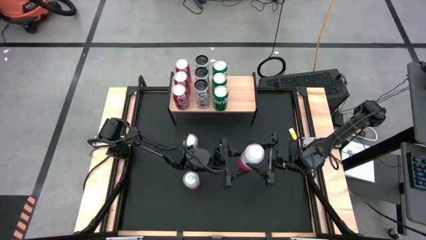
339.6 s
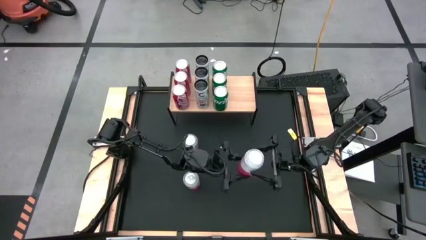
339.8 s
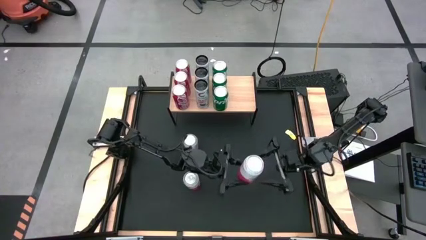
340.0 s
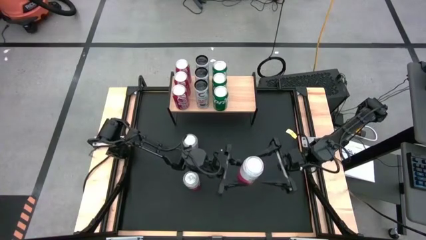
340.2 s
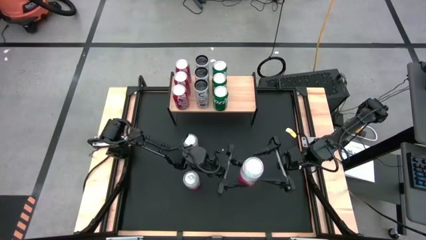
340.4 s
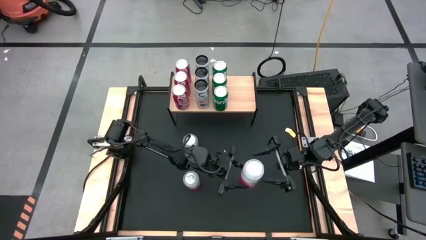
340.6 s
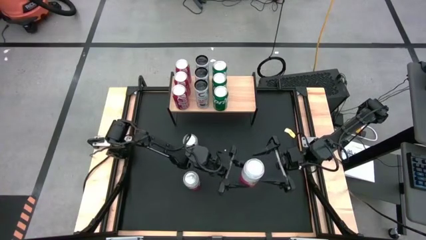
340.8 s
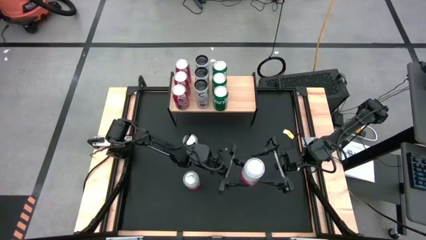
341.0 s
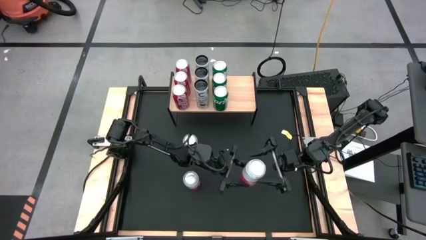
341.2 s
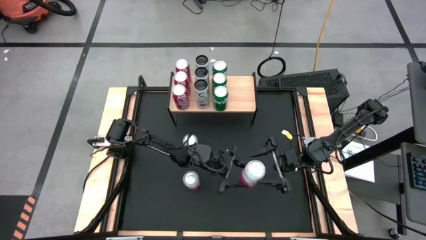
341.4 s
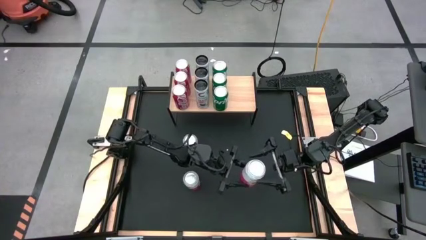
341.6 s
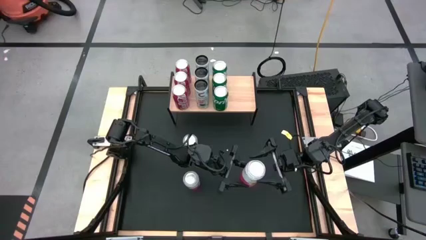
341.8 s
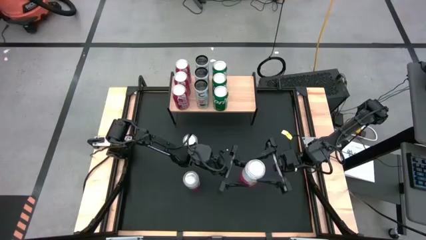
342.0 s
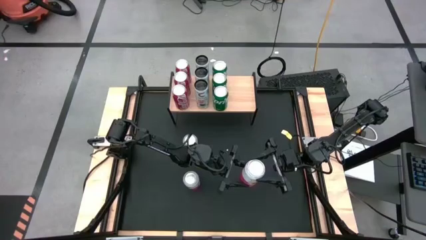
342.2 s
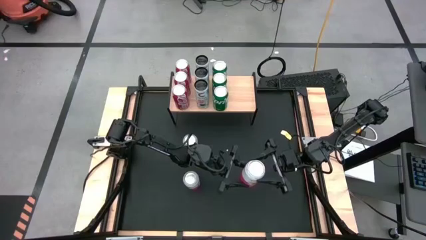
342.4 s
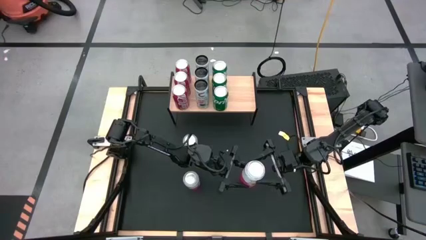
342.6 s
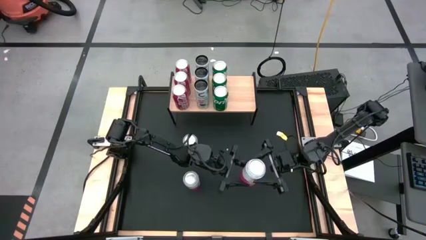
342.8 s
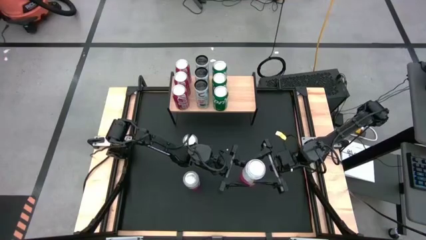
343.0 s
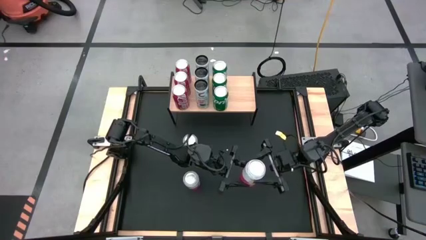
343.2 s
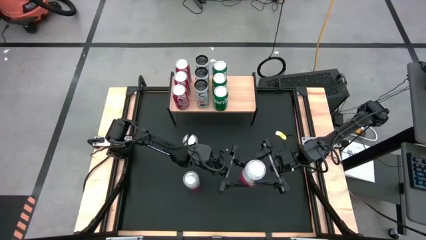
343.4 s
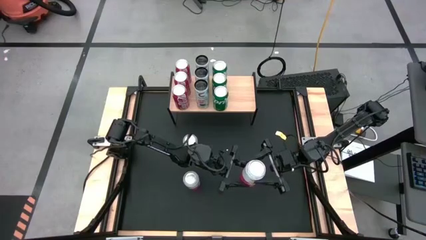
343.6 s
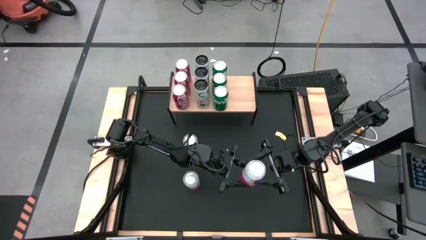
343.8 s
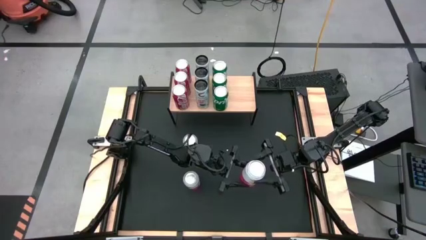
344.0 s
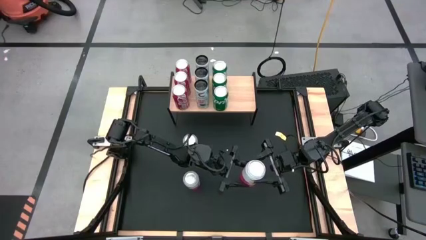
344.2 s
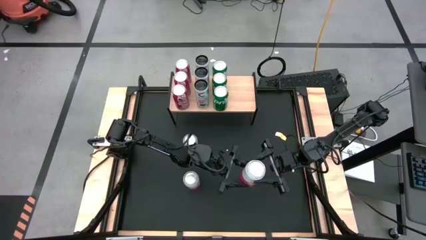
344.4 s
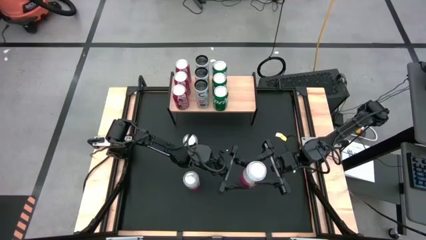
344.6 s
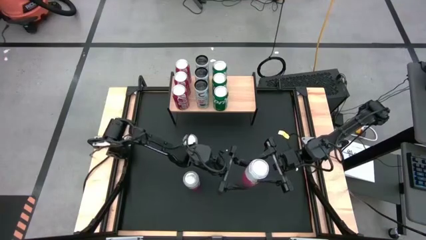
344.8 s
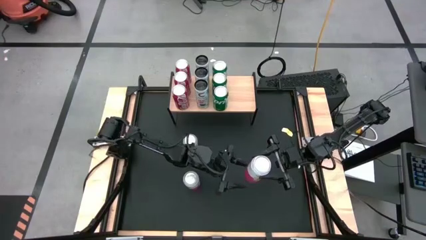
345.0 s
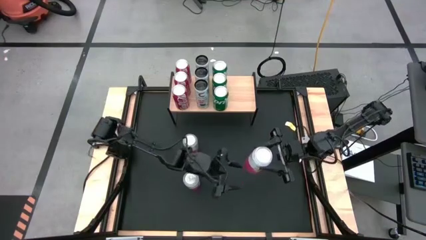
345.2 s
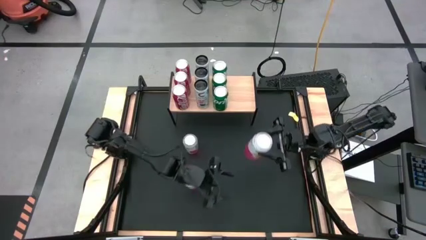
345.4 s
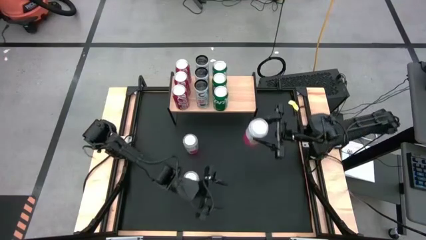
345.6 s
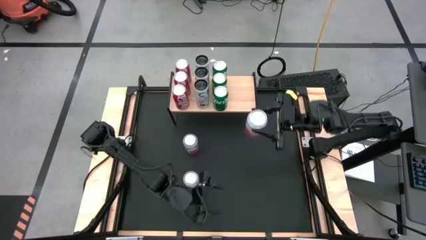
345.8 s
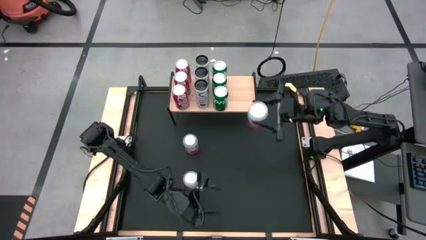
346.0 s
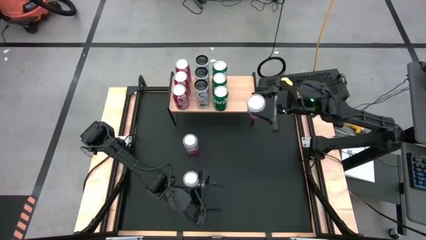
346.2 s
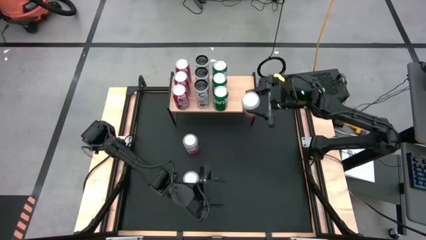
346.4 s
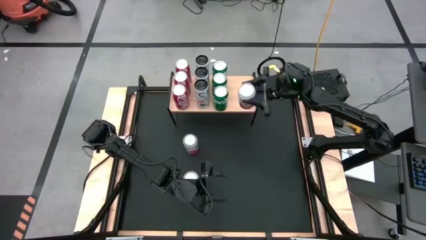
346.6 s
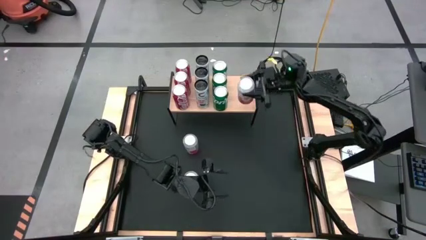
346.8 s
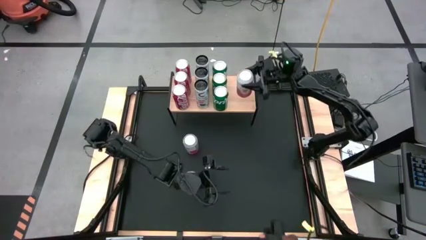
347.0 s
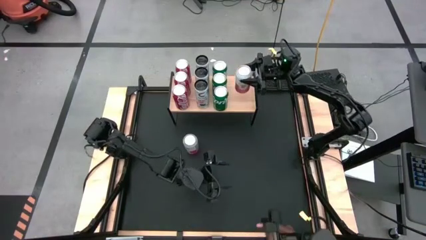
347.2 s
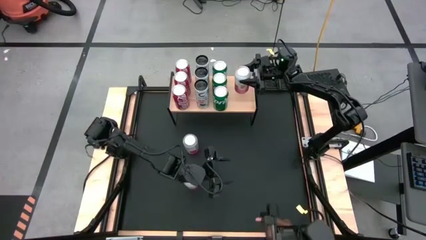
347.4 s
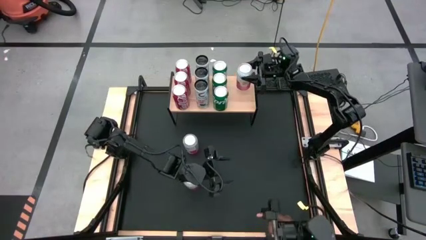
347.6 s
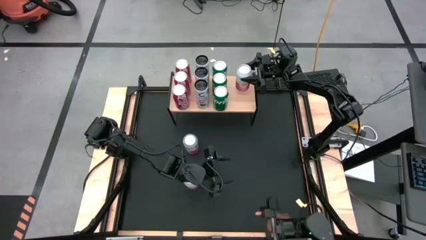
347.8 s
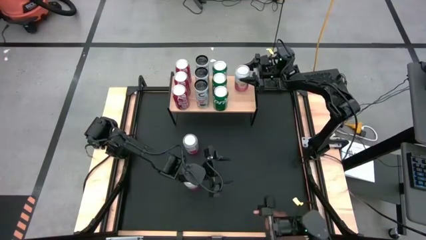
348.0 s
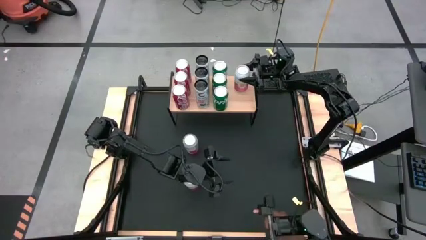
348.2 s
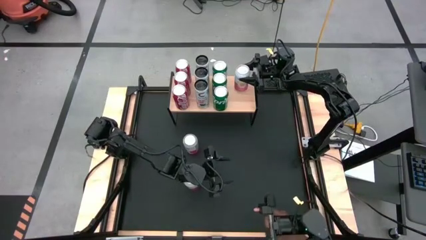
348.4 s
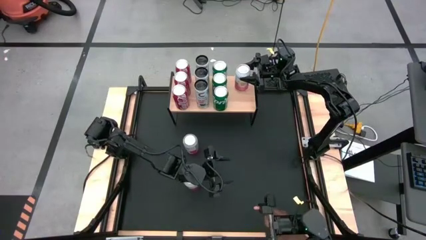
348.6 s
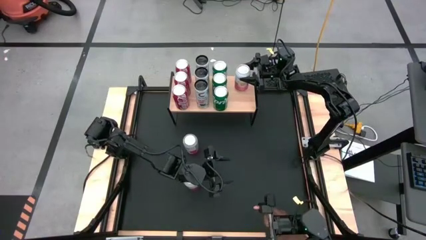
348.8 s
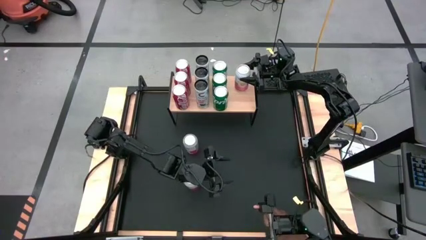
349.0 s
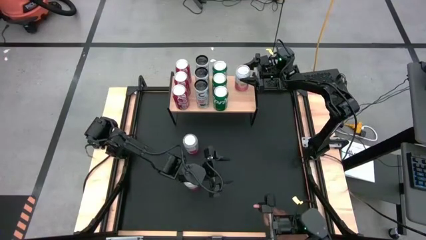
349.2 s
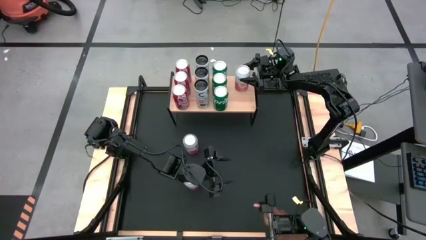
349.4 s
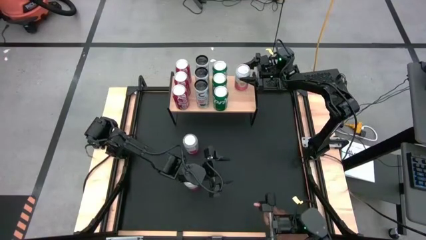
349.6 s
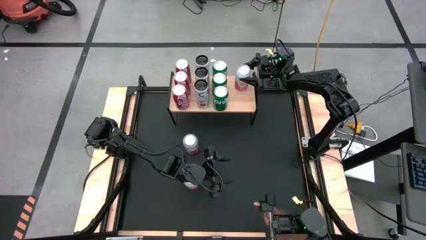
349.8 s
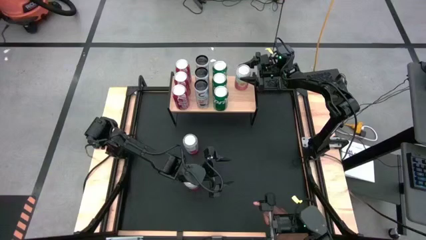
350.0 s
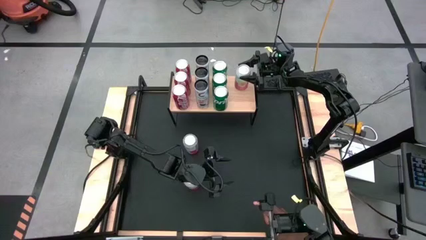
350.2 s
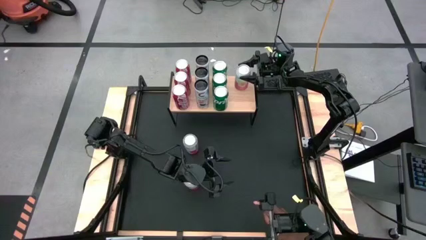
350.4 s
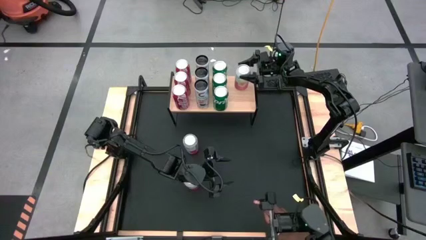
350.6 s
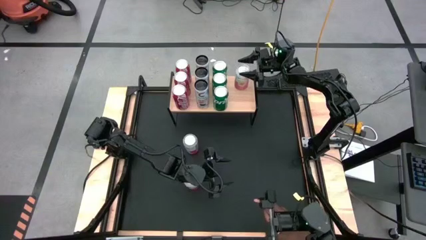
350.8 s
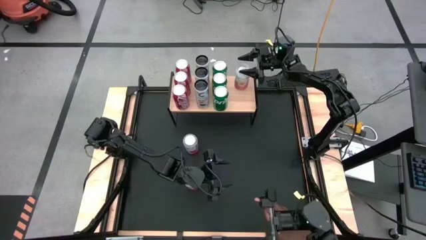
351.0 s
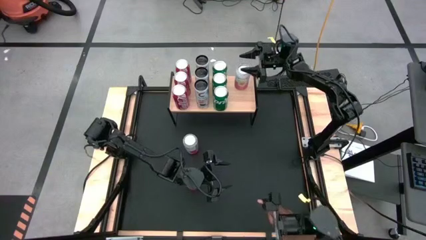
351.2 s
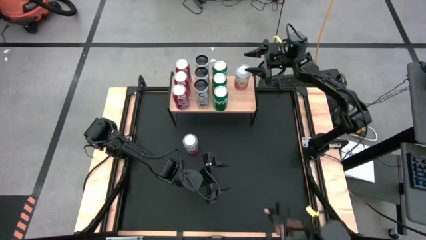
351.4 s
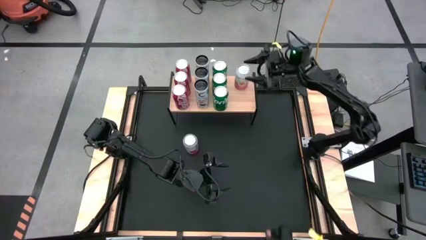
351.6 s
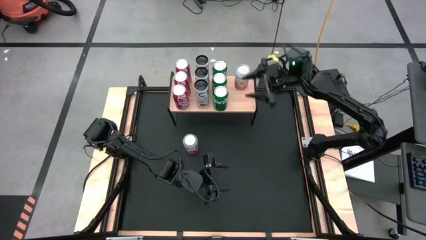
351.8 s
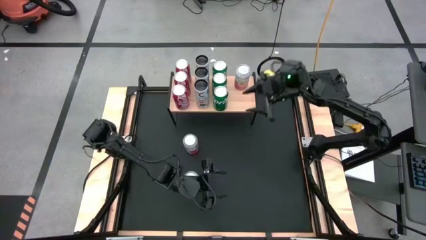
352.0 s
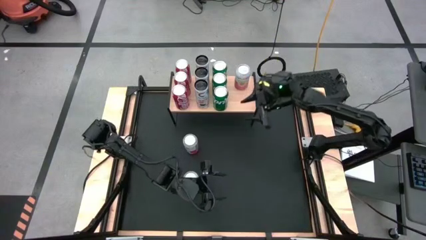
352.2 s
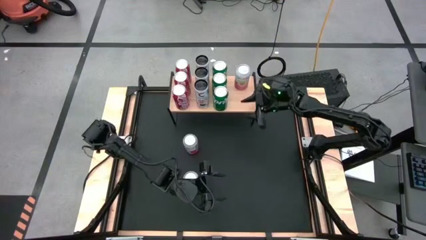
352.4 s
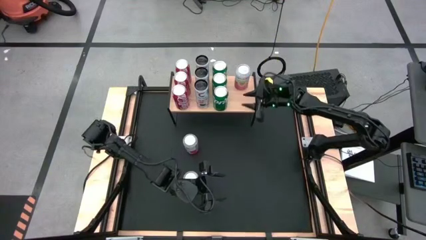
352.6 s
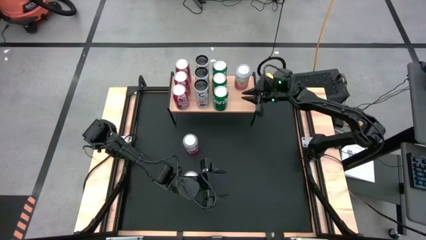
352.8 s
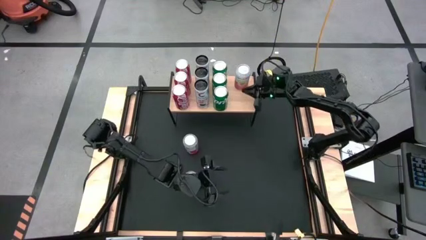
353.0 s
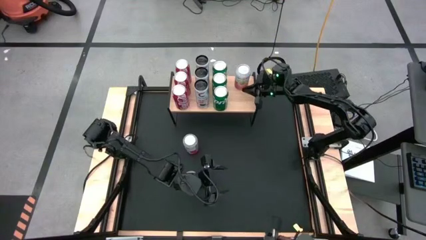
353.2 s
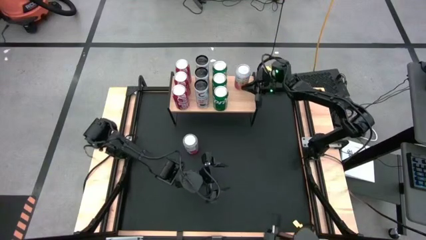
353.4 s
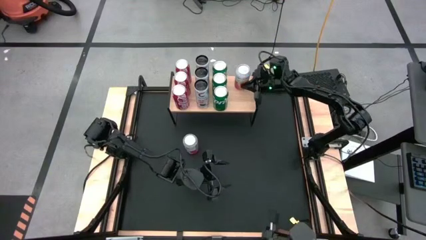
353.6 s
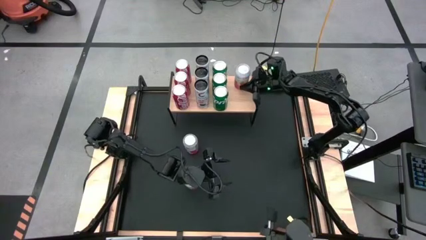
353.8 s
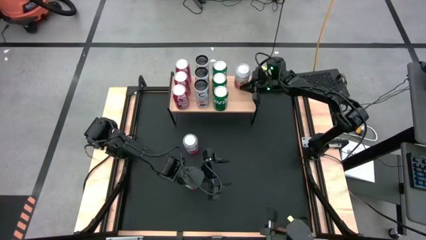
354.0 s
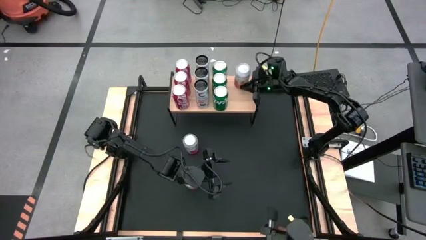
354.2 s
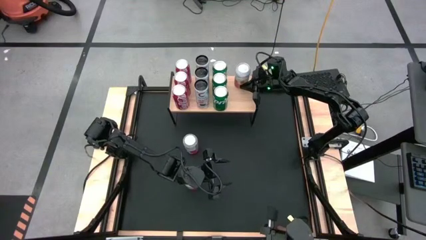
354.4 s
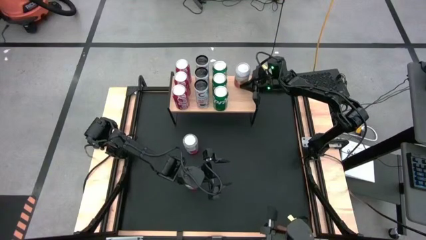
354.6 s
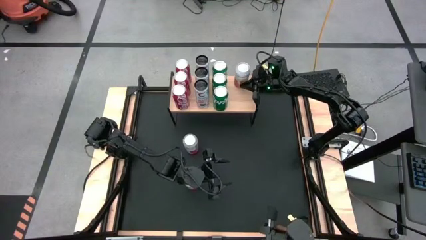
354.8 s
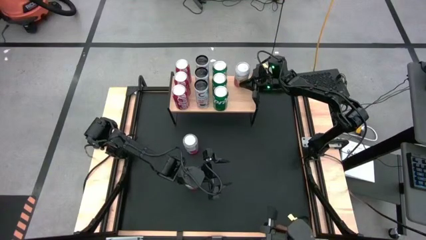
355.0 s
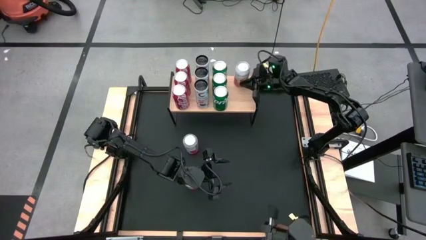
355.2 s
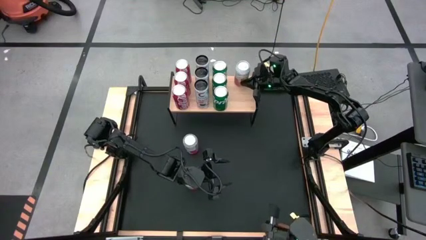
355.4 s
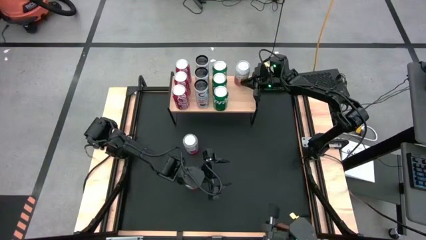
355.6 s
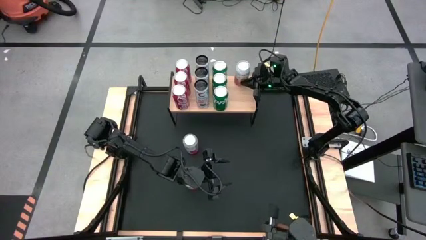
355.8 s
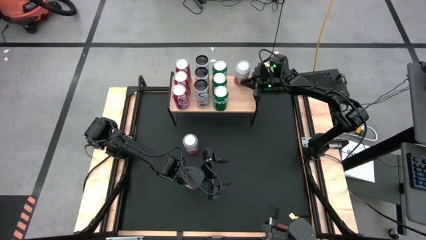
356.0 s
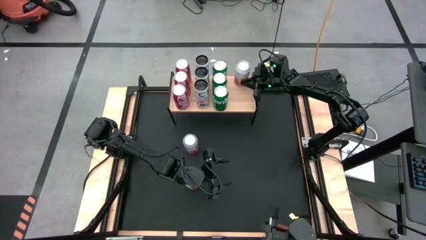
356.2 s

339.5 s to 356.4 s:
Task: Place canned beverage on shelf
Put the bottom right pink soda can on the shelf
